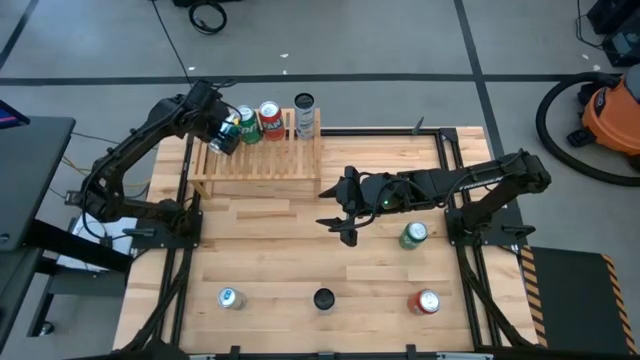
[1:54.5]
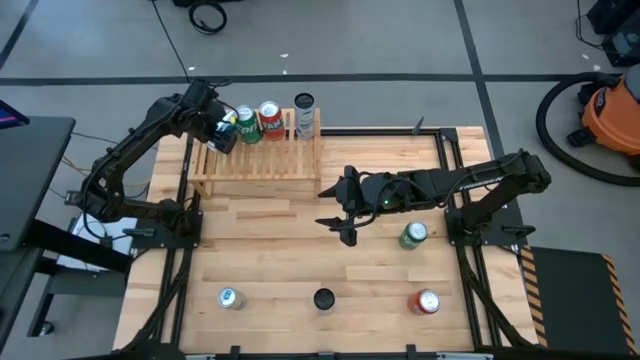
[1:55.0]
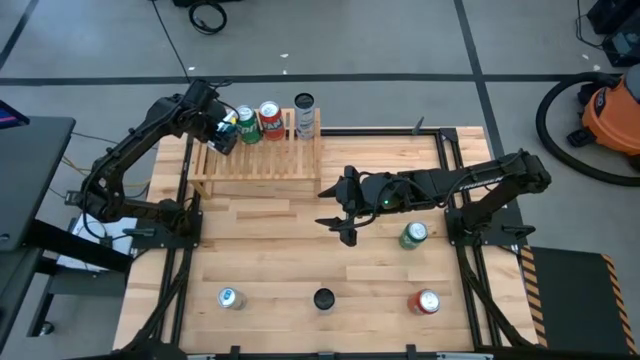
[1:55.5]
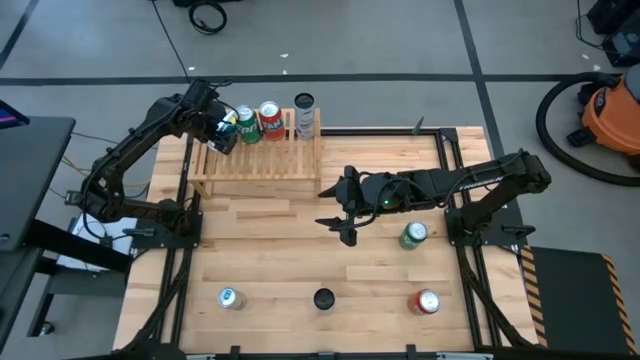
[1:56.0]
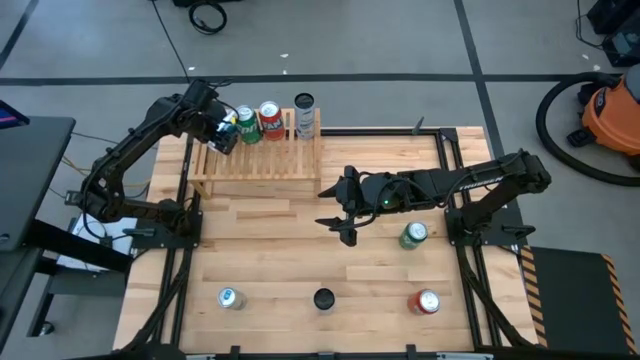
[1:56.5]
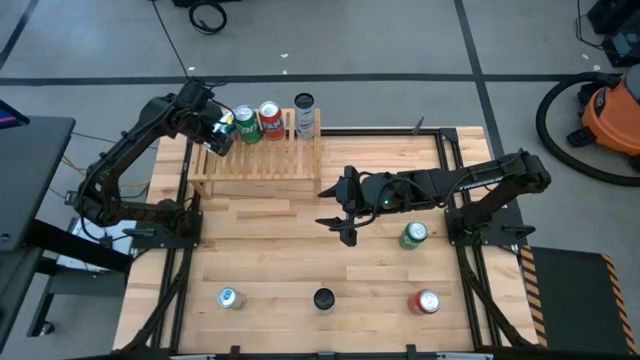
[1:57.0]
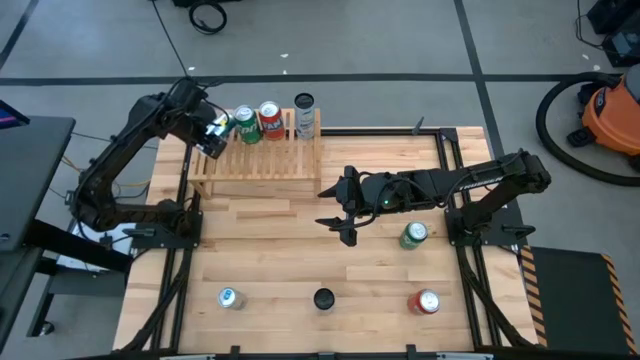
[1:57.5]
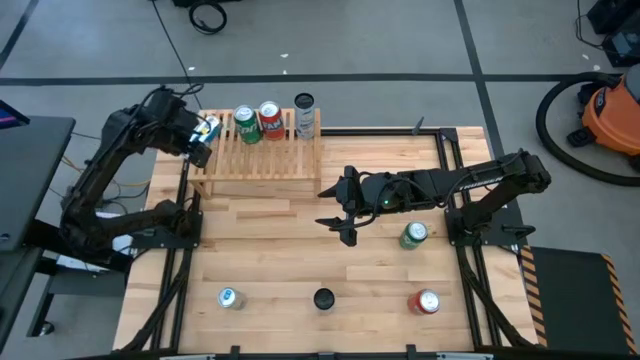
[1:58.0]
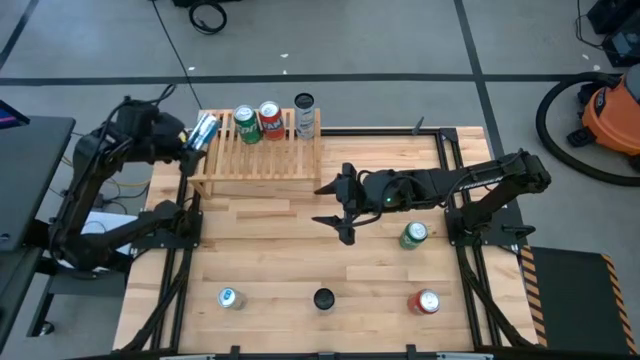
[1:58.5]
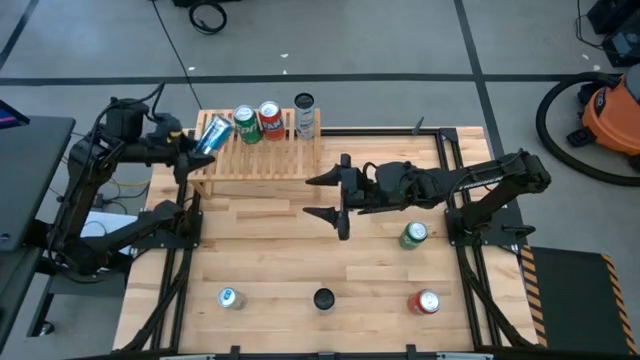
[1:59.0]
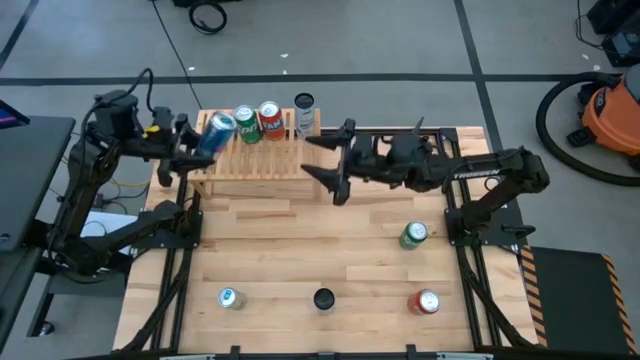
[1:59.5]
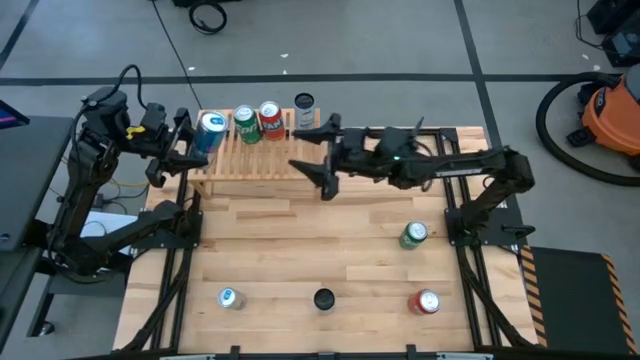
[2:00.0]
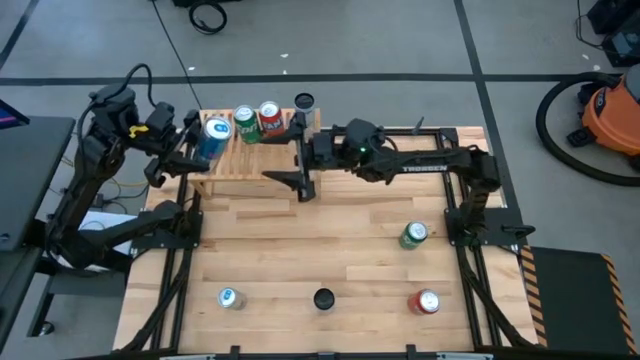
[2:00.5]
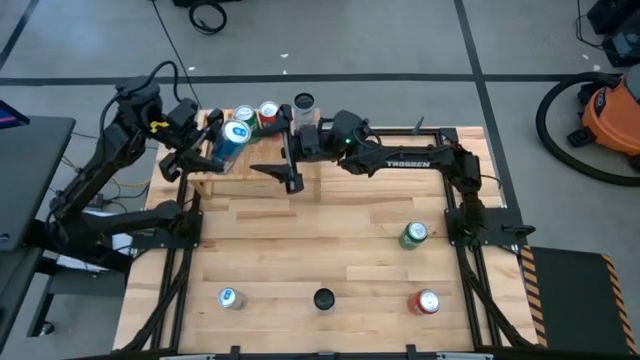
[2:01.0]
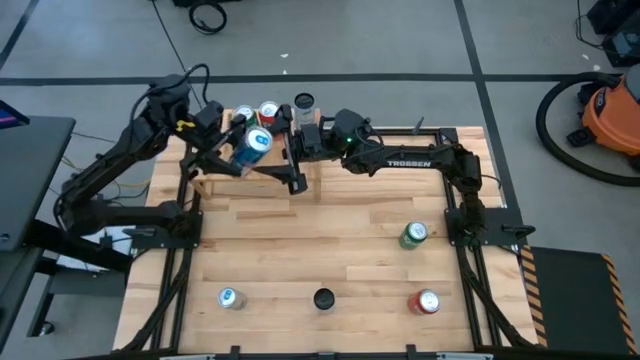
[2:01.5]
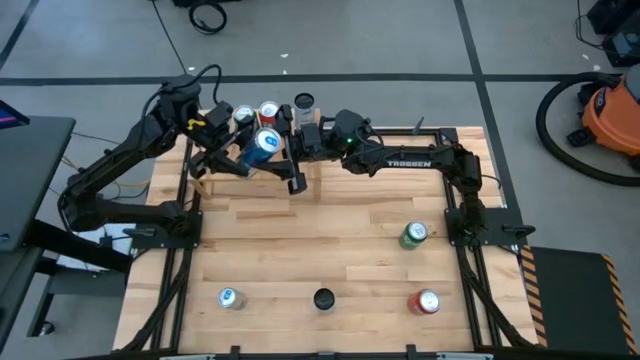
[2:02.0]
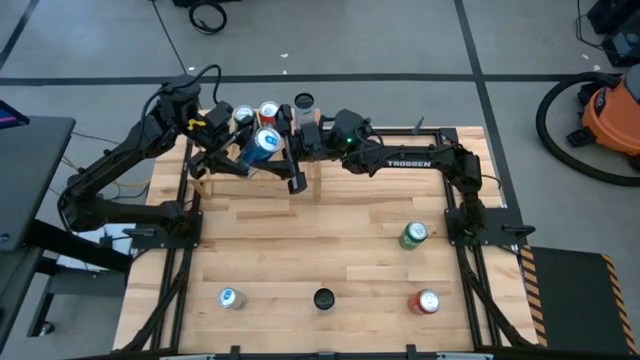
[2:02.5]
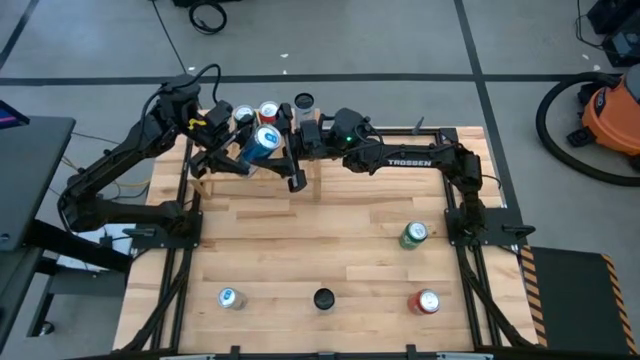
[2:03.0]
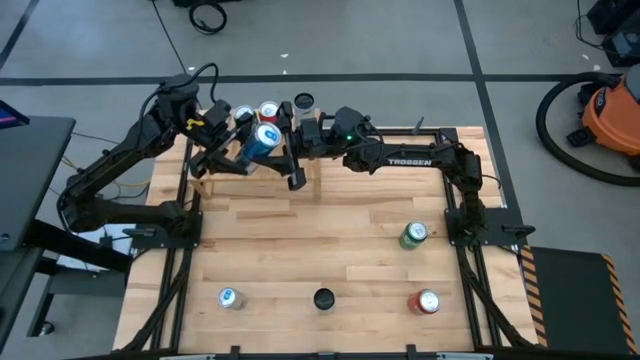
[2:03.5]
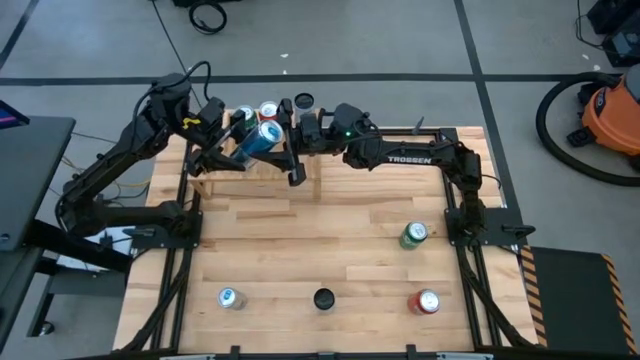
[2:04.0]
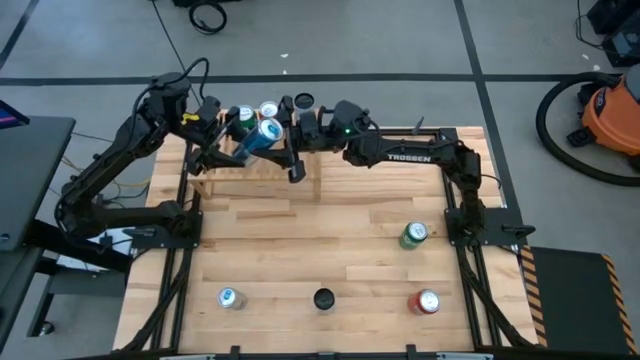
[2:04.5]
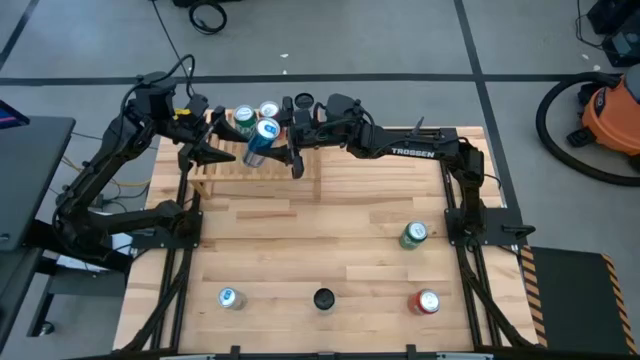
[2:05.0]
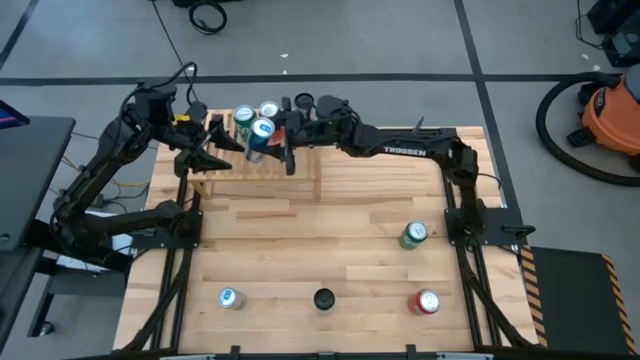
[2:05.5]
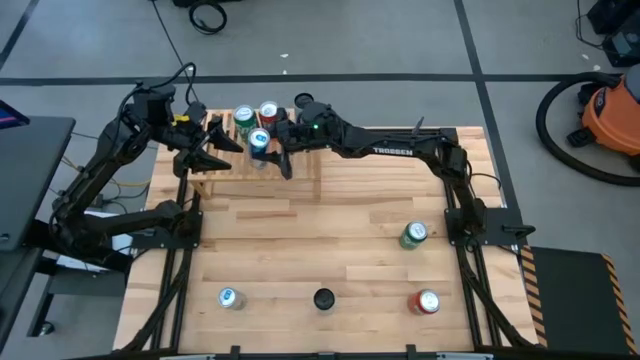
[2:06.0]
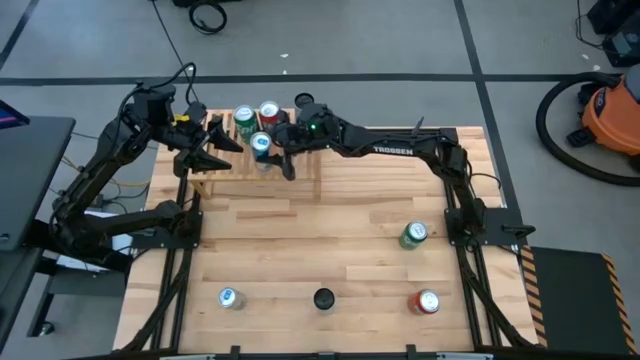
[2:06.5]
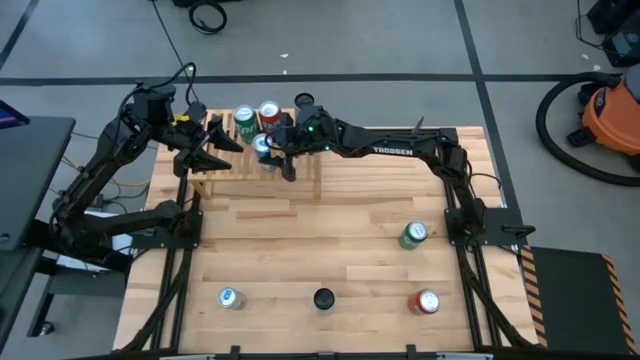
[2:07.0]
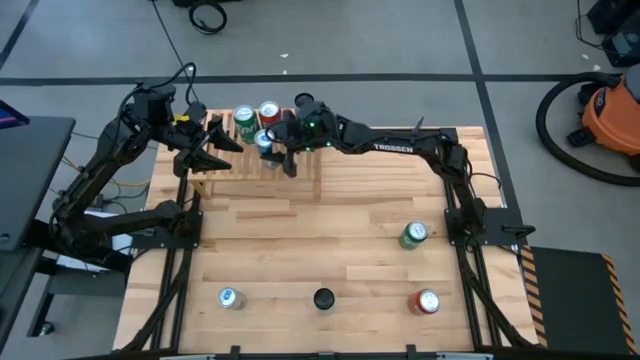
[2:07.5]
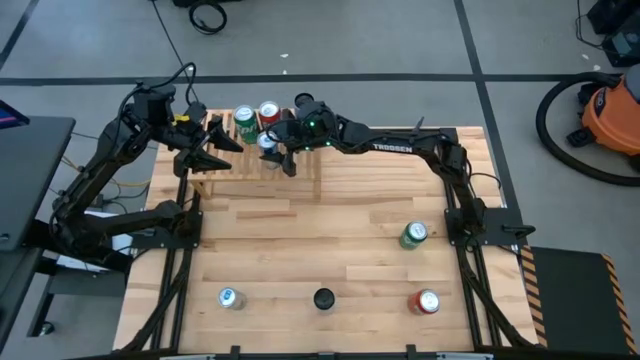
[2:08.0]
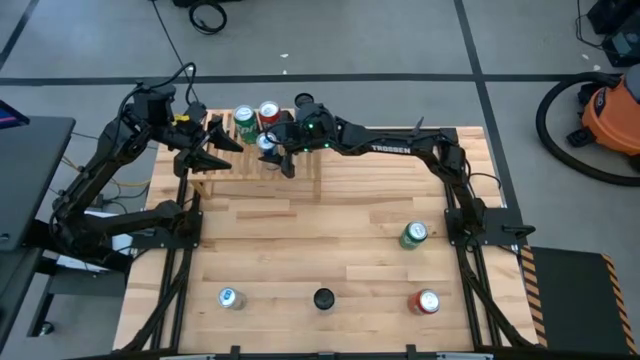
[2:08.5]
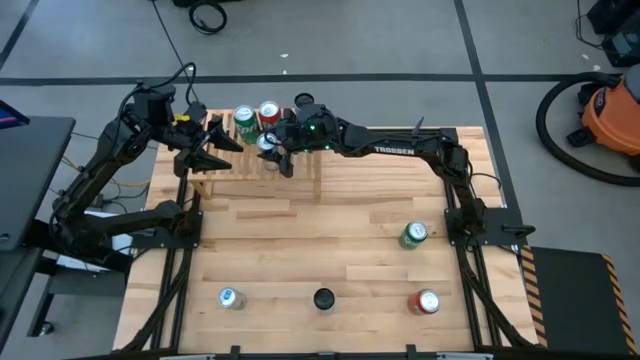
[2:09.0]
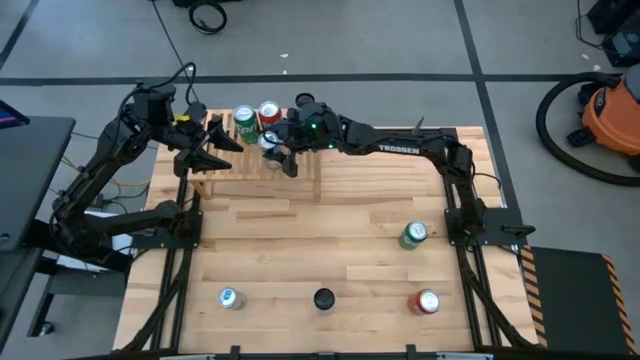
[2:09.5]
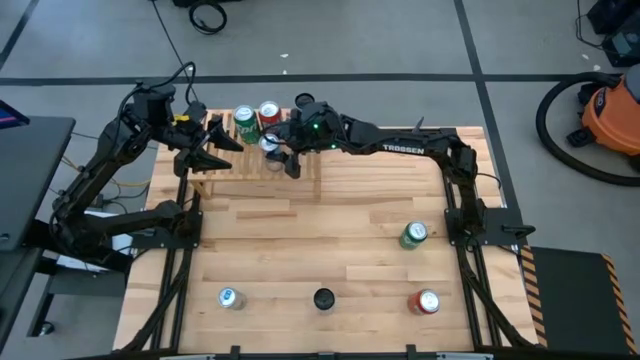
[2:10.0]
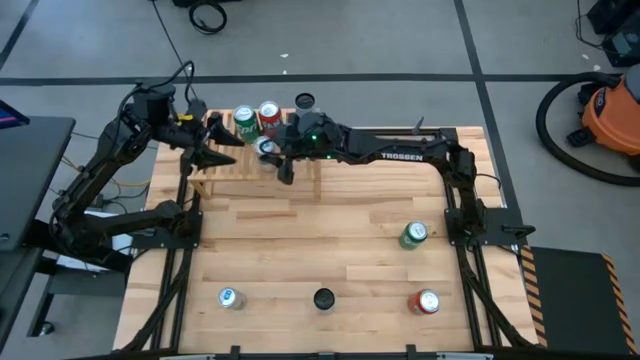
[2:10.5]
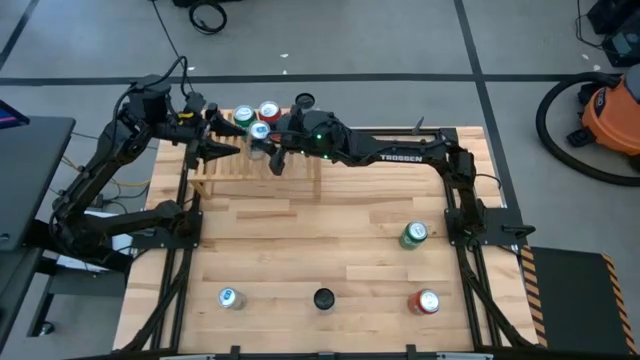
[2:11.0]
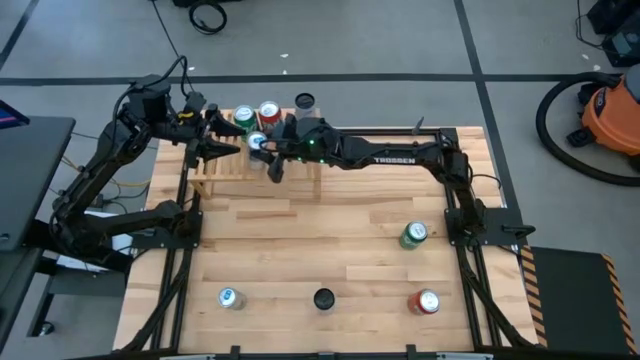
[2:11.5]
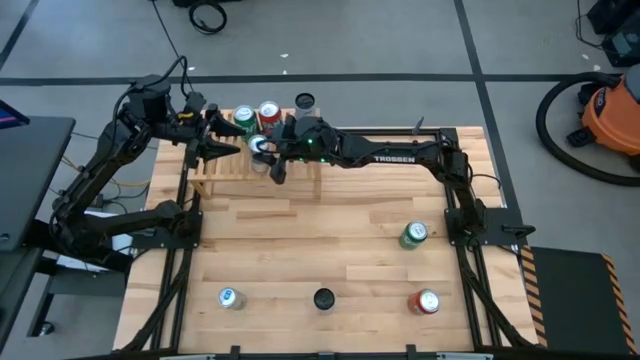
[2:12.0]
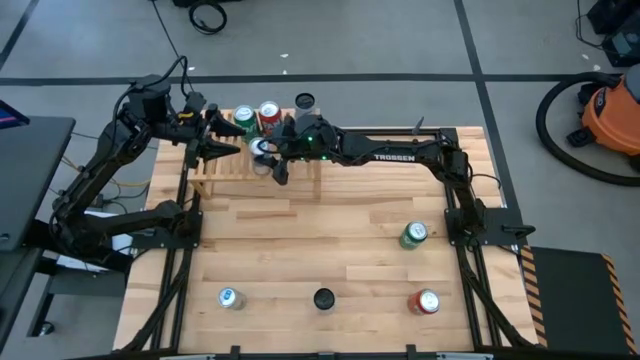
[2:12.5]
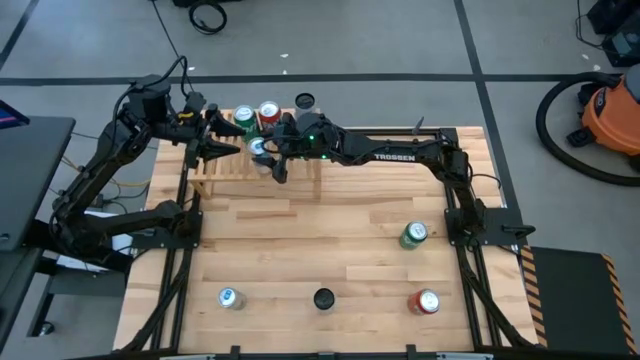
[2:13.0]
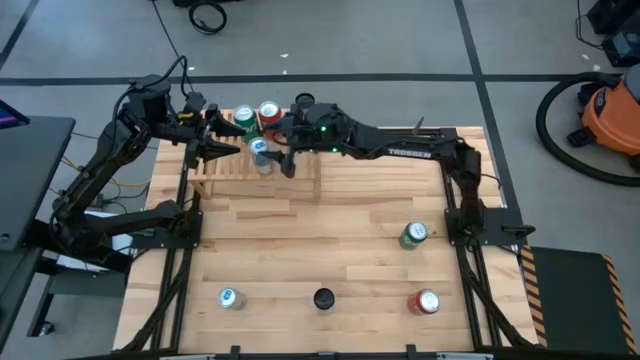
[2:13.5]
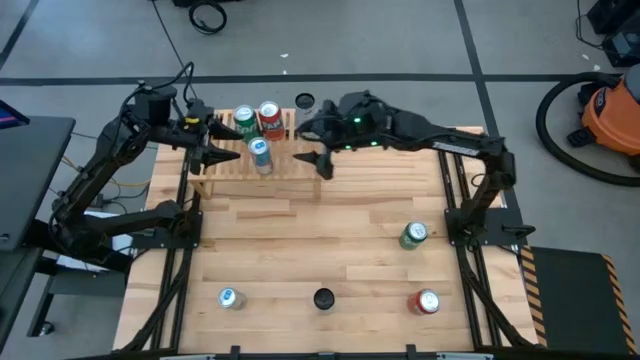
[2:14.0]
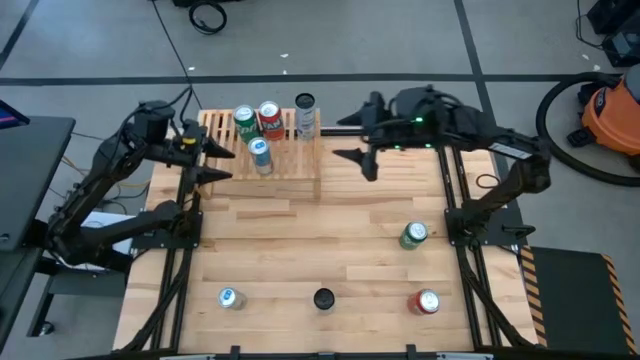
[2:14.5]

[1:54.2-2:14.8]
Task: Place canned beverage on shelf
Put the top blue soda can on the shelf

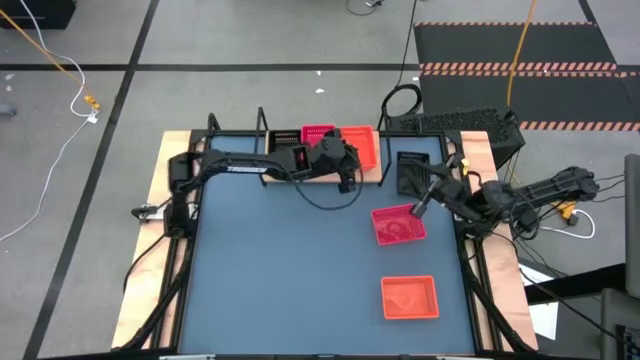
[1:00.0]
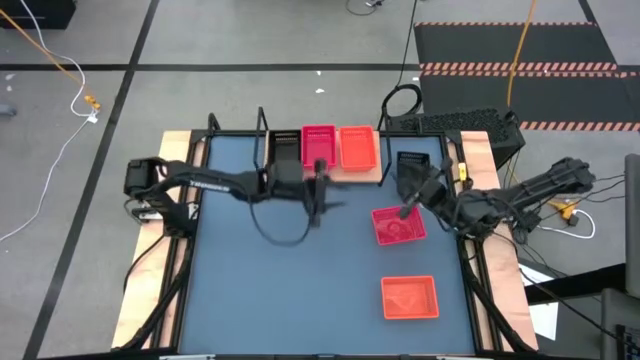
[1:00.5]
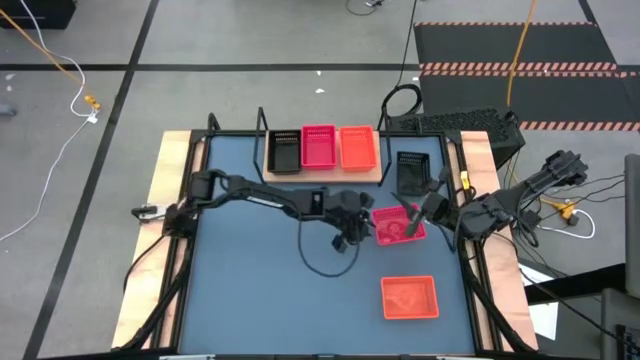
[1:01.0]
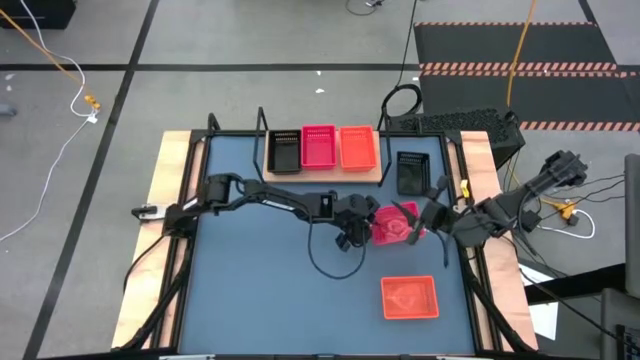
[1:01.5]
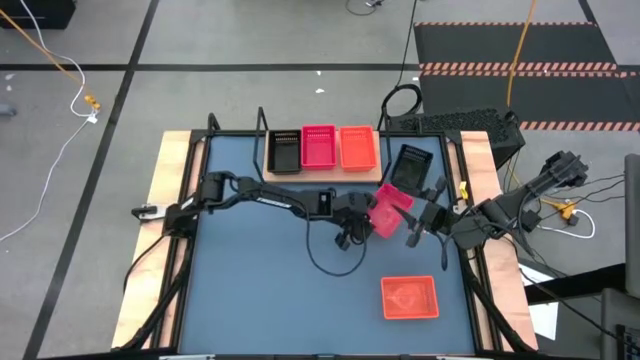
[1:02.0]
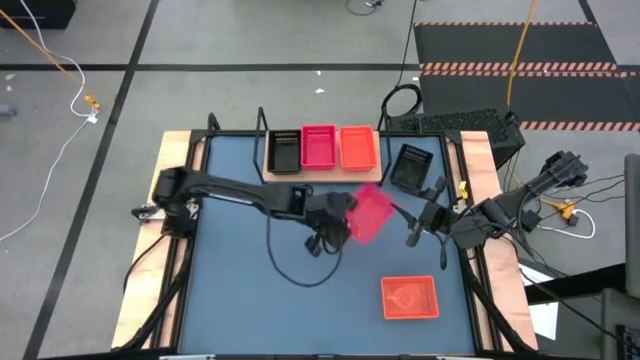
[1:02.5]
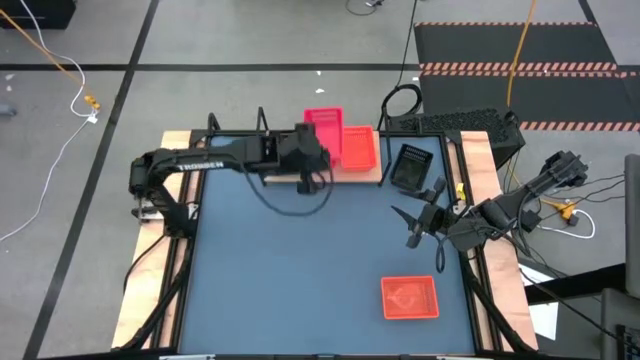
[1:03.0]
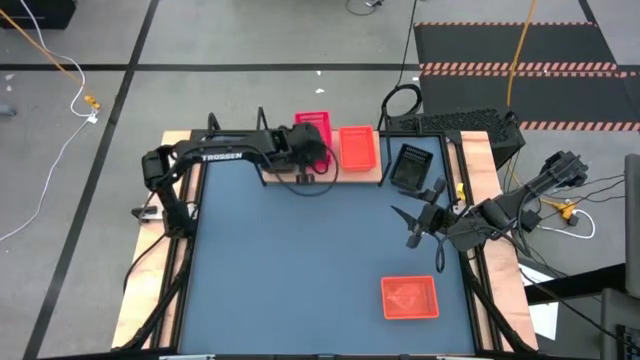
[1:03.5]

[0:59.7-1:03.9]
Task: Stack baskets on shelf by color
Stack the red bin on top of the stacked red bins on the shelf
